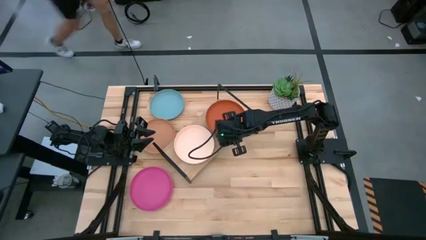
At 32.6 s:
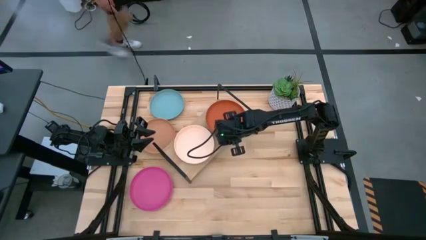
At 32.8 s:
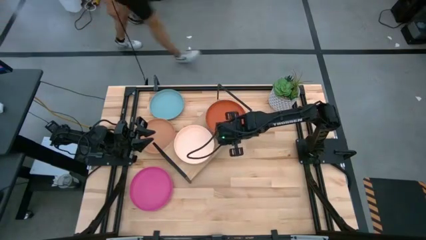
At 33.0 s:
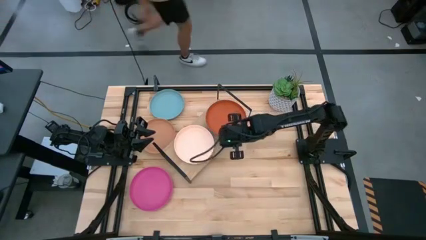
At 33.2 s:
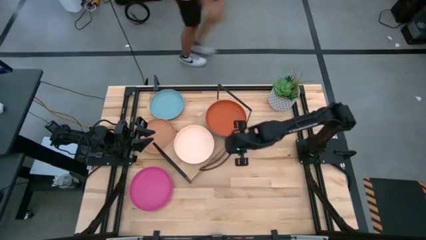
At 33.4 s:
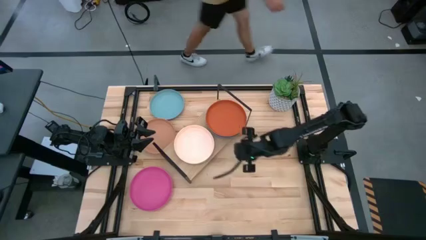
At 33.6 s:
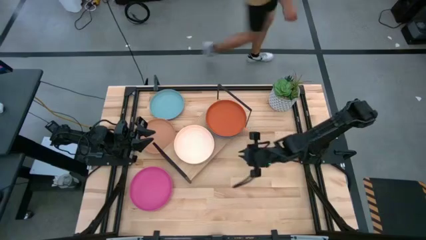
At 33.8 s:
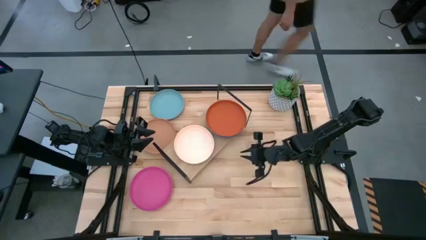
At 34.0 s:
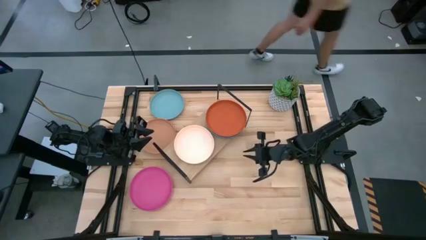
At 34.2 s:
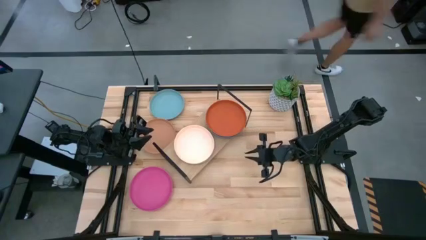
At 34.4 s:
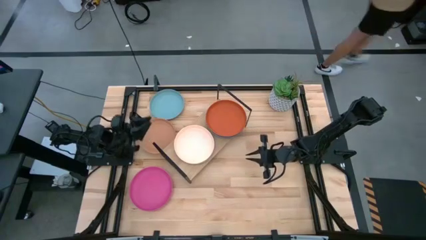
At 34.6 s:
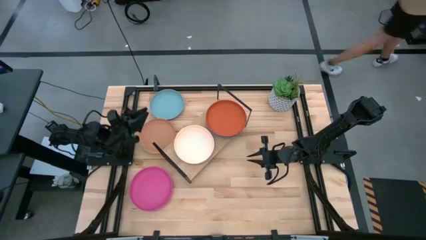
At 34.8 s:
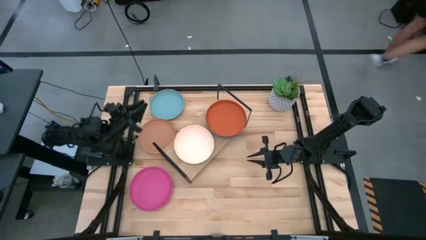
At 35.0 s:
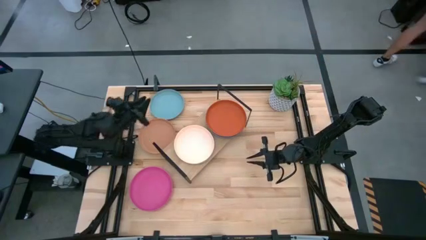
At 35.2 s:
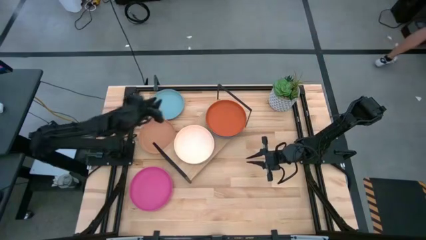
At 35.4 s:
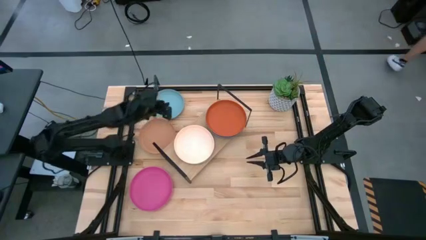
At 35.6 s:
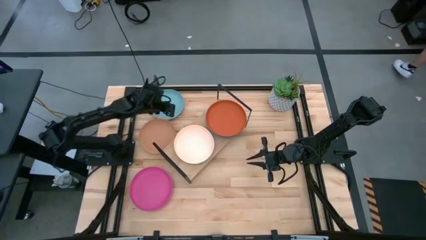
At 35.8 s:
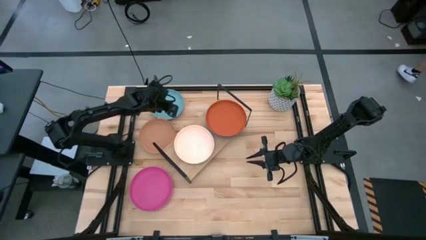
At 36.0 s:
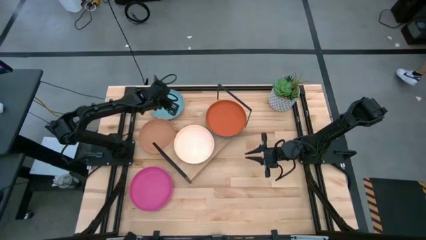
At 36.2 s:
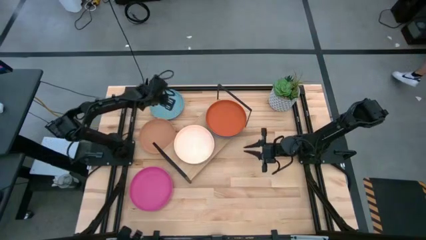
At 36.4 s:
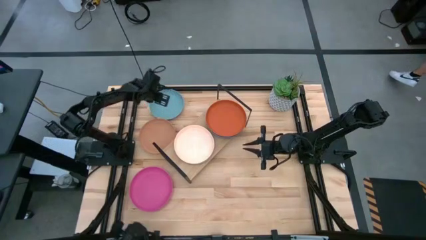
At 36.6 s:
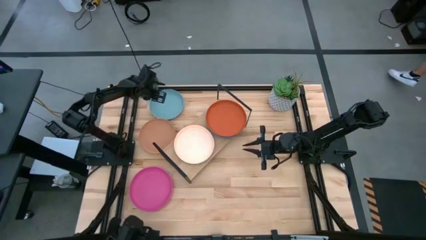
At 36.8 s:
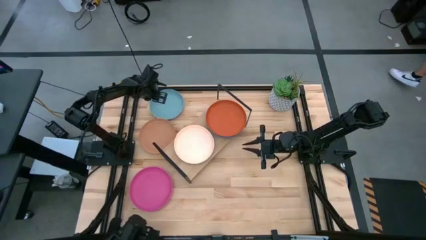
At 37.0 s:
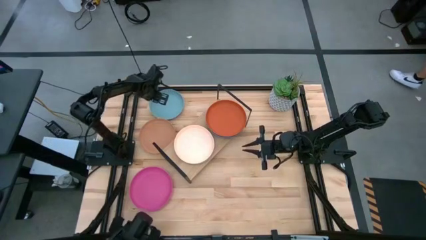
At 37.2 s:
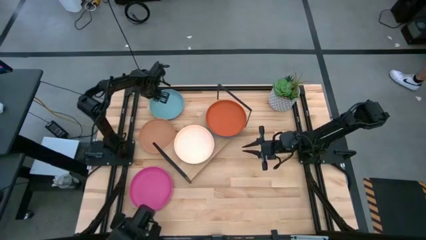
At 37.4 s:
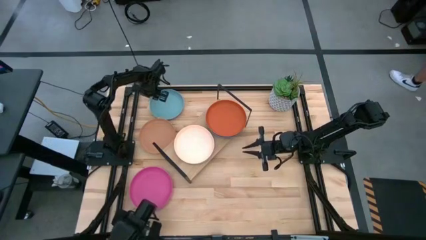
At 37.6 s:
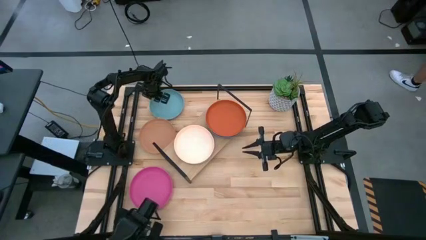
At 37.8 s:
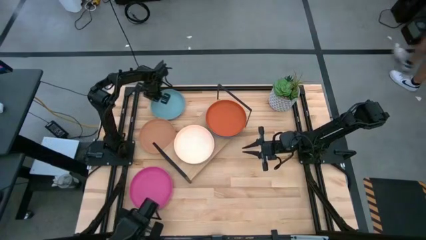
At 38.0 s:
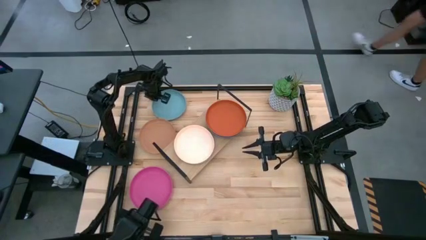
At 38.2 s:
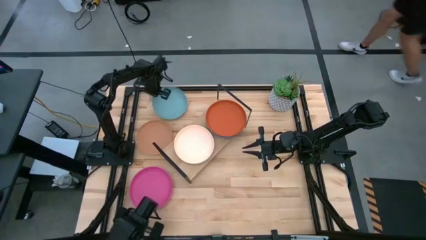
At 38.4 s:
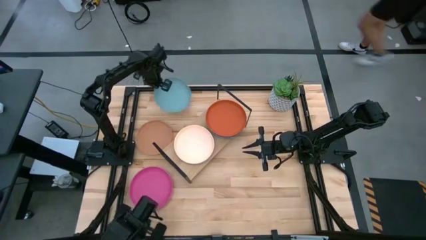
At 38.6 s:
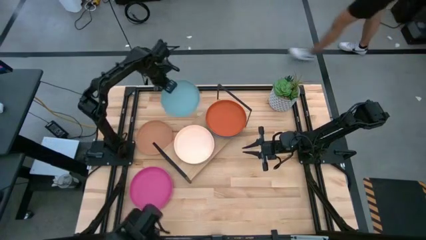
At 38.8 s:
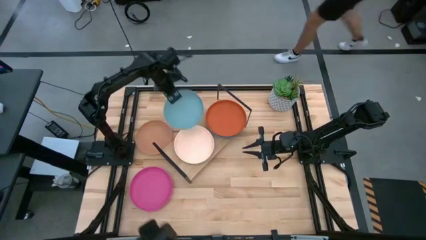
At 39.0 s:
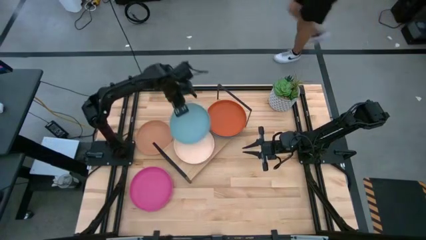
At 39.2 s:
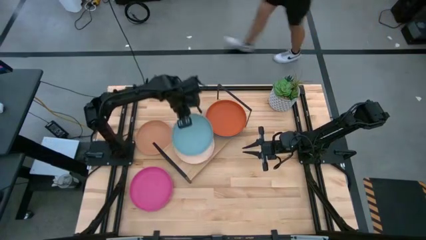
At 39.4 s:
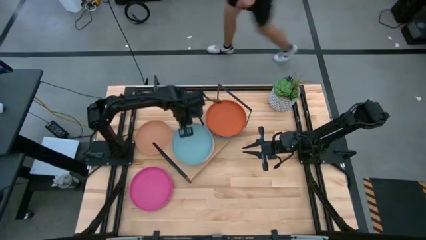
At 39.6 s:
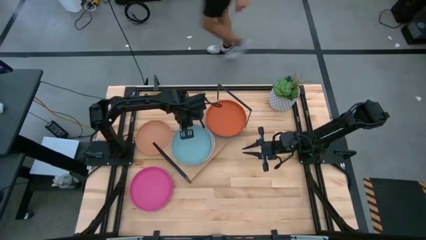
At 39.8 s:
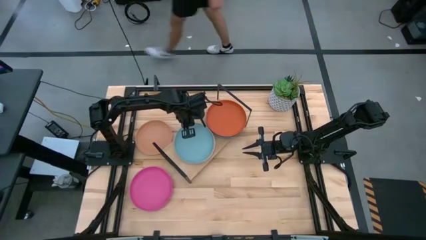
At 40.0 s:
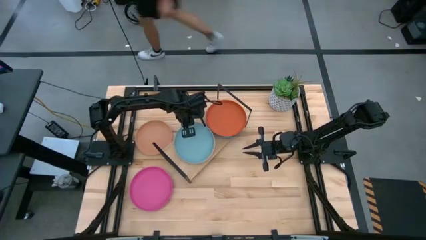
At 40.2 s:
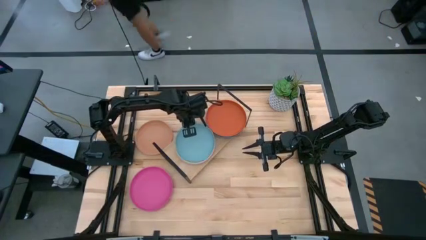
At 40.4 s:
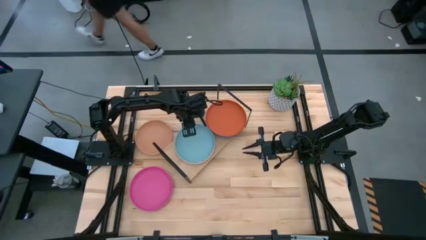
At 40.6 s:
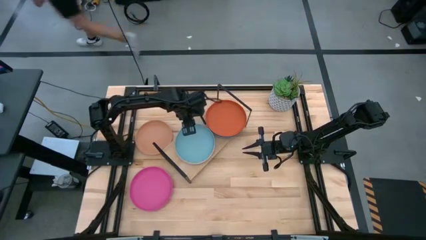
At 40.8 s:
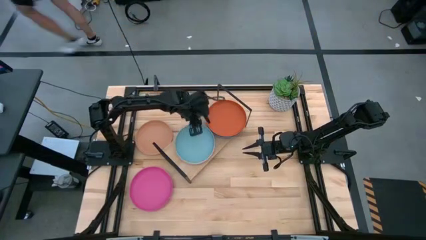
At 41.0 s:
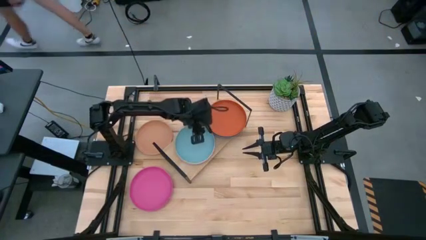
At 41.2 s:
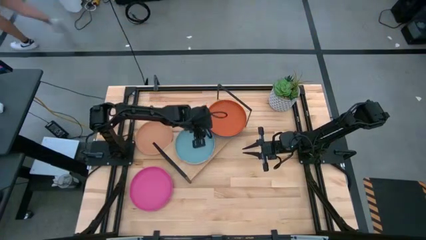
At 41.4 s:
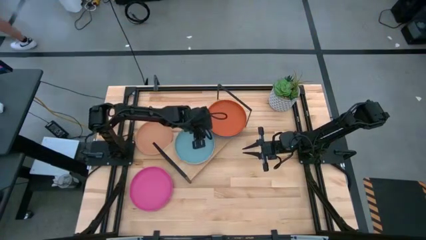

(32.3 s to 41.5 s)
Task: Place and stack plates onto a shelf
Stack the light blue plate on top of the light orange plate on the shelf

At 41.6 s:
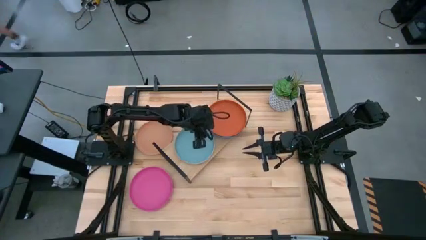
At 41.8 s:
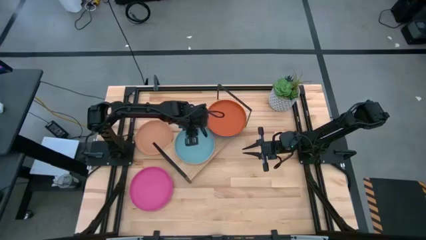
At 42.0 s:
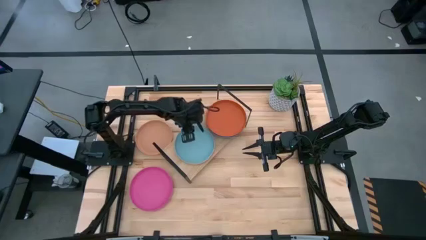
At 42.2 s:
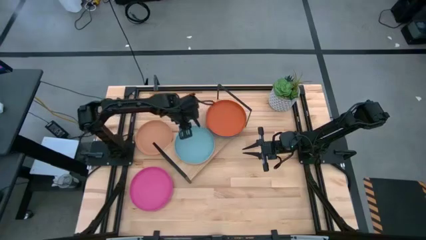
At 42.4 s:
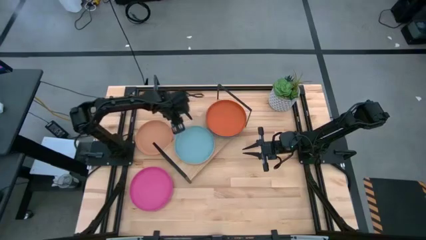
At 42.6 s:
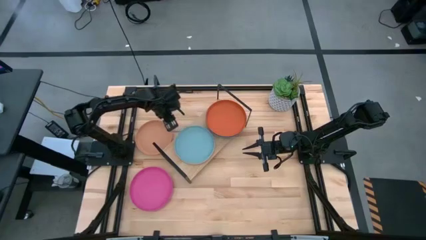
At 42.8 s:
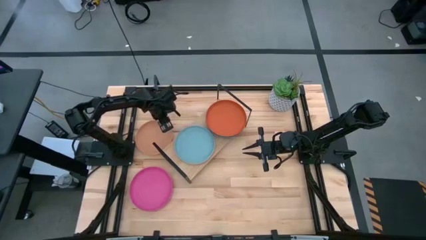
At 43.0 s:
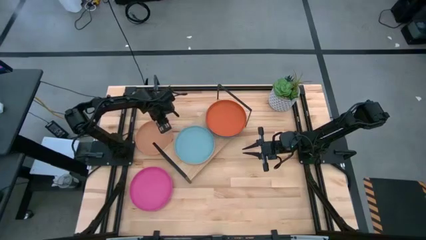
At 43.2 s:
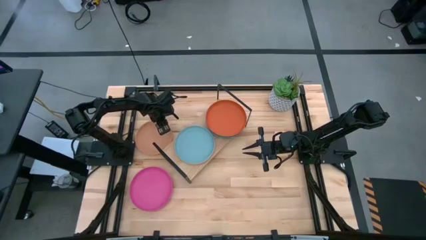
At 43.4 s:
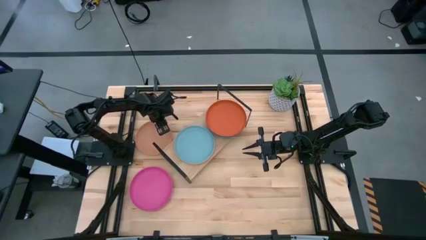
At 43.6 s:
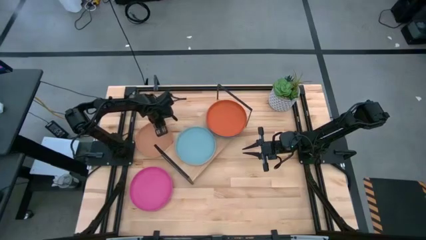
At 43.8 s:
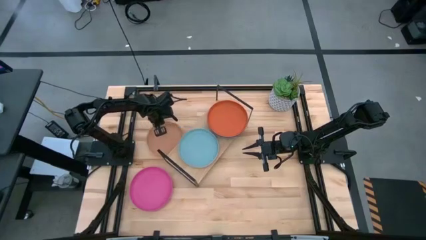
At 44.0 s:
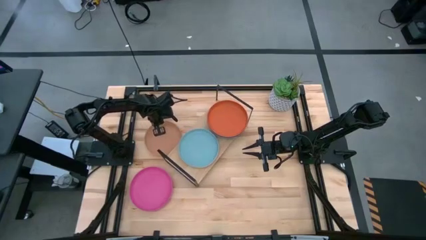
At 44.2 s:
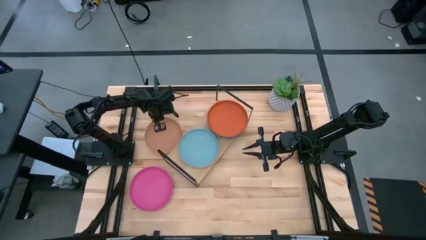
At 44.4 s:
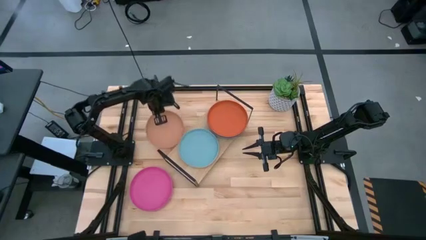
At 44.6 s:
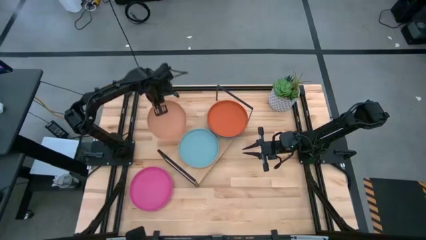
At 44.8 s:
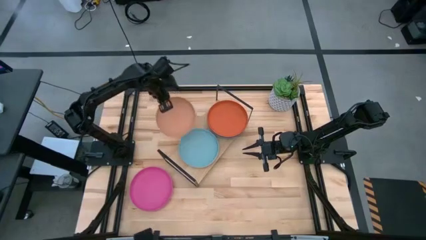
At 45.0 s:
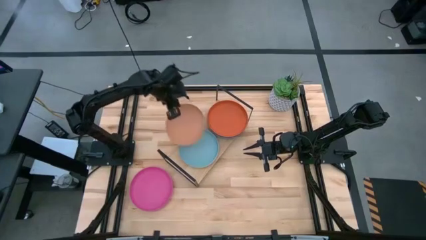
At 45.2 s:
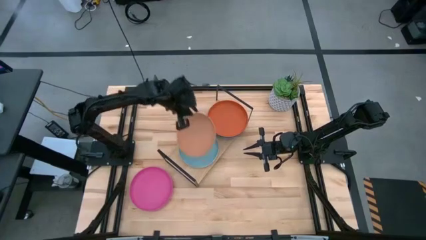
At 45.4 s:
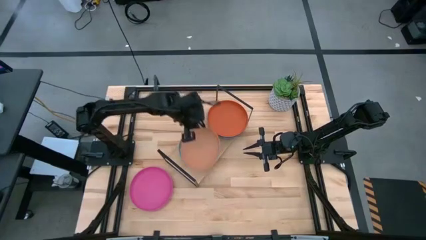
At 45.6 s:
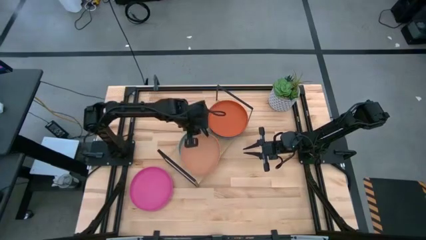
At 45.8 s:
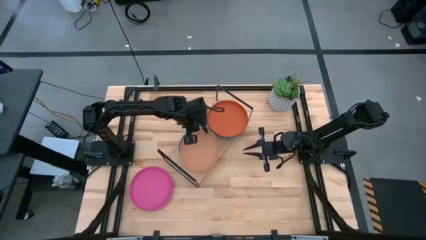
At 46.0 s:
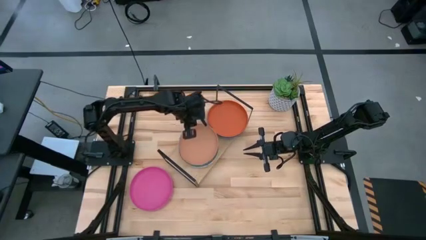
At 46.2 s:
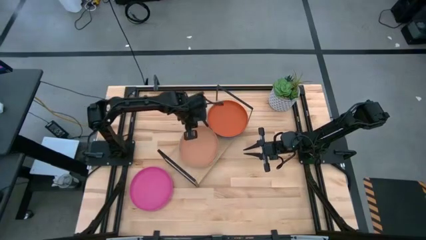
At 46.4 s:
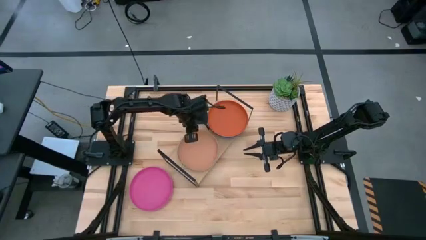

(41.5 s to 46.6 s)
Stack the brown plate on top of the light blue plate on the shelf

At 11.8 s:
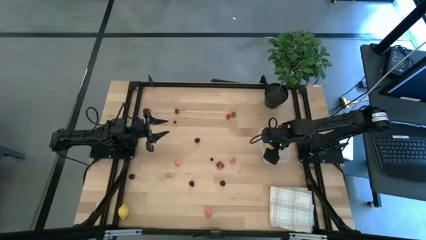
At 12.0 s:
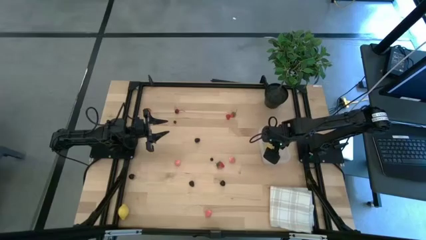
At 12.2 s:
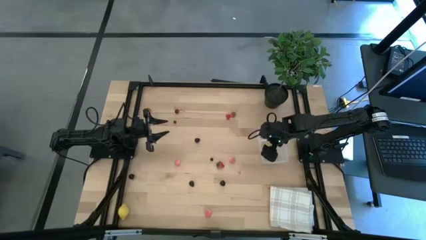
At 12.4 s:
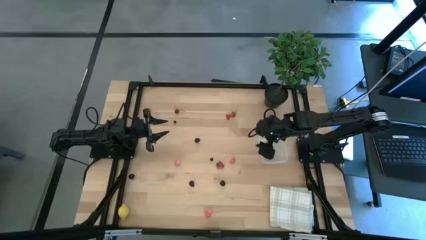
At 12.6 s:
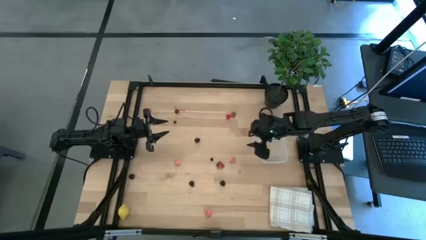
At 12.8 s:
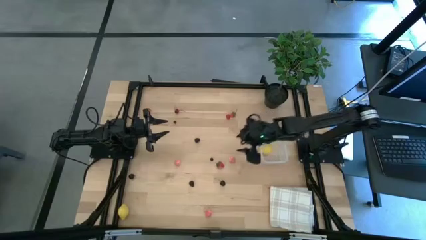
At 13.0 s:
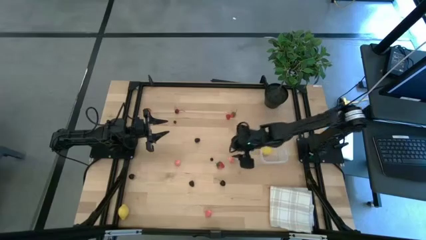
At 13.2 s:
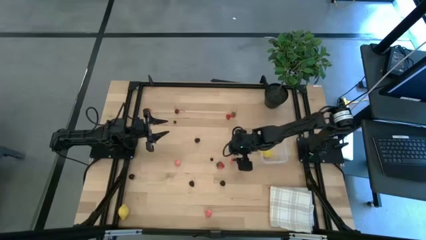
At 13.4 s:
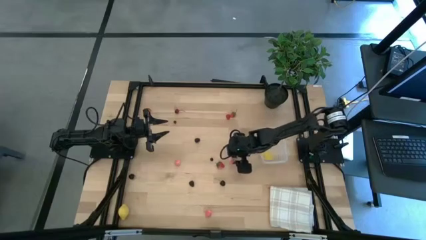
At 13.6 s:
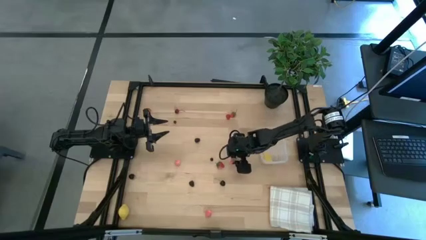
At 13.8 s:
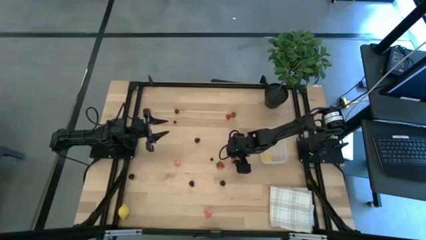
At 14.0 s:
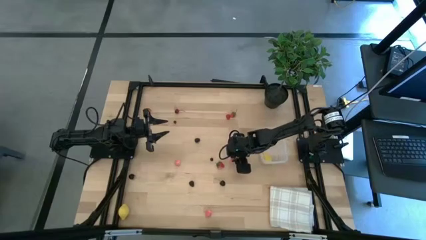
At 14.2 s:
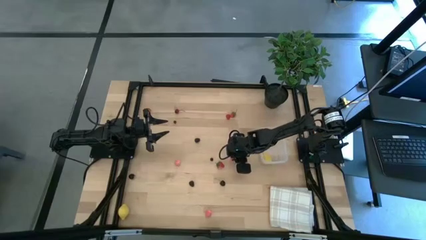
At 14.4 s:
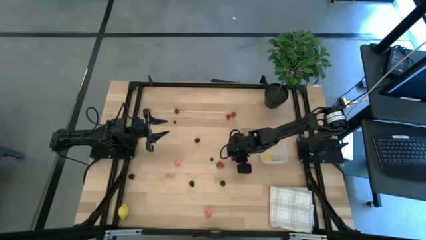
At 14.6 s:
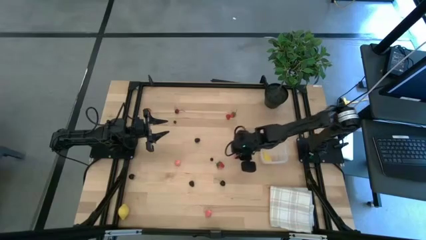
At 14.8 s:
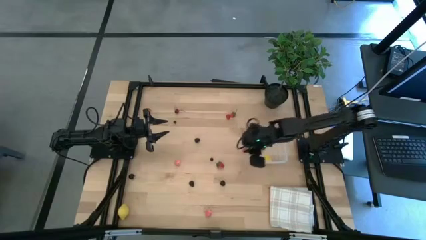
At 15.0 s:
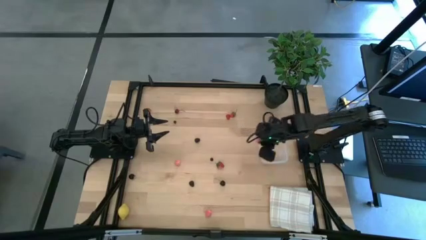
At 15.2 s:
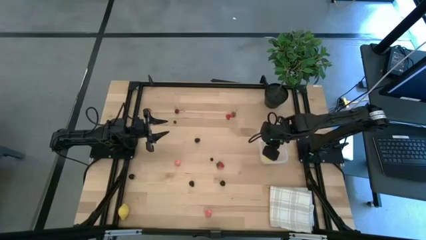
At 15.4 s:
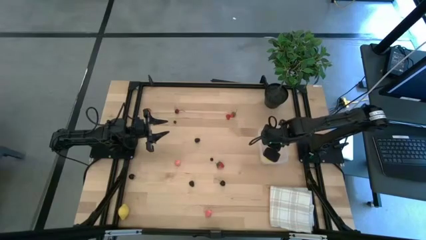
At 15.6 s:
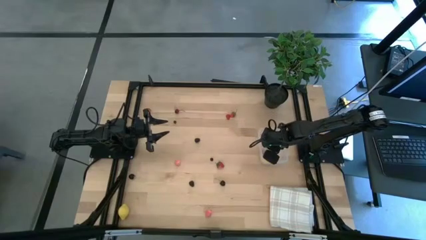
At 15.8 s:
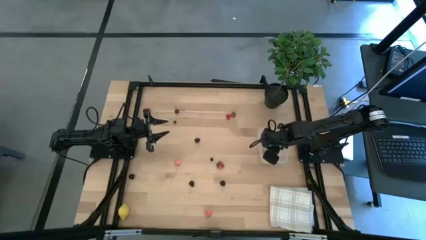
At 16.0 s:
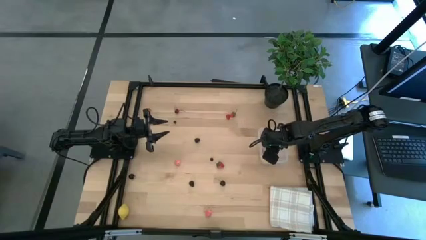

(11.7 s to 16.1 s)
Task: Pick and placing Produce into tupperware
Put the right peach into the transparent bin
